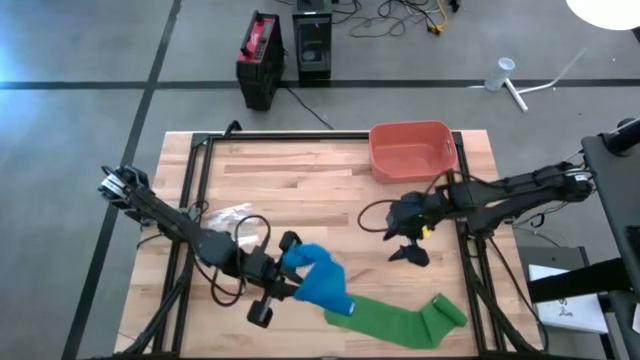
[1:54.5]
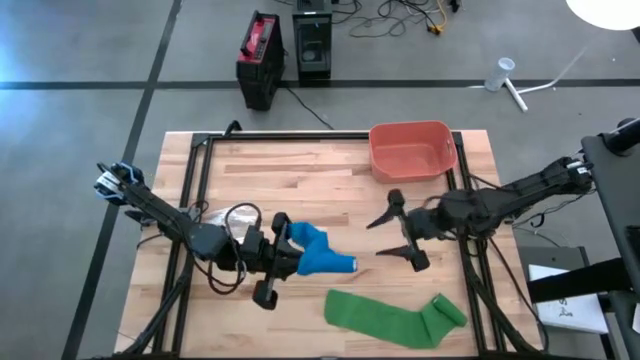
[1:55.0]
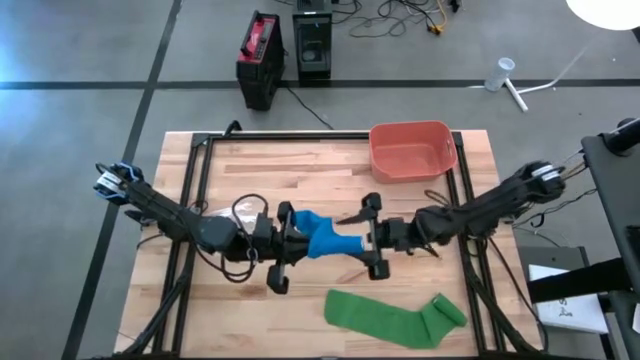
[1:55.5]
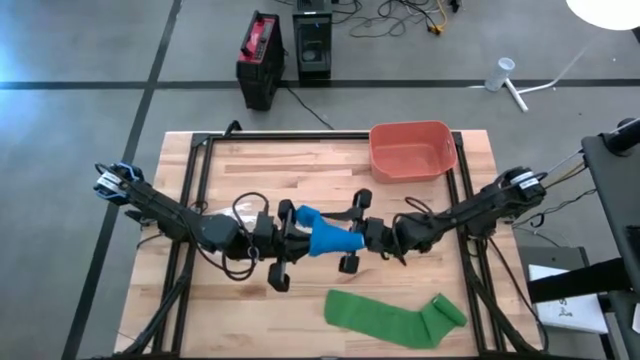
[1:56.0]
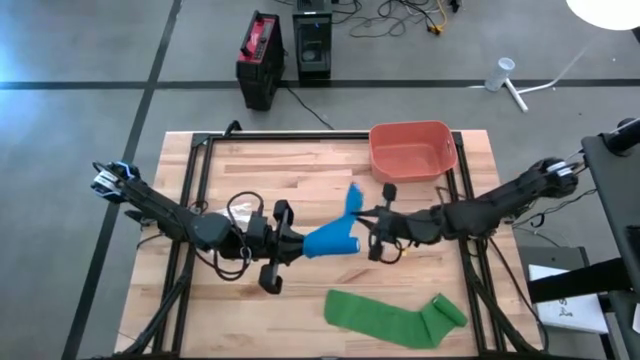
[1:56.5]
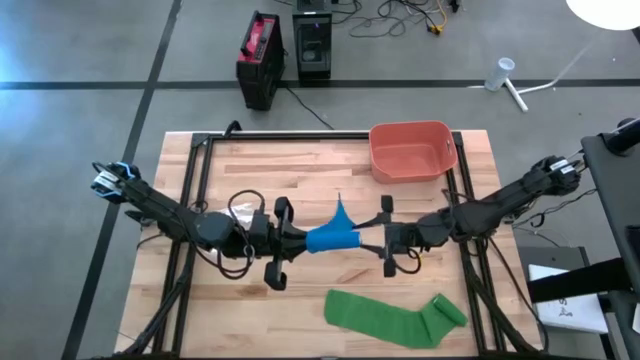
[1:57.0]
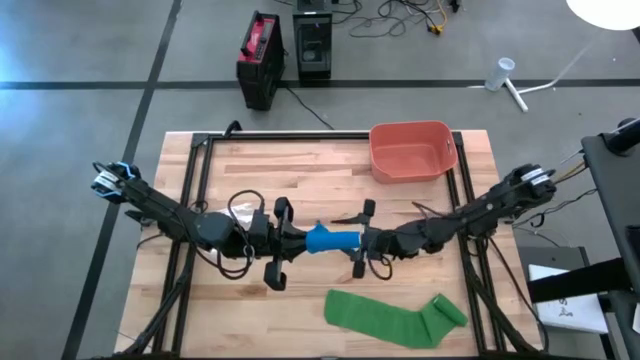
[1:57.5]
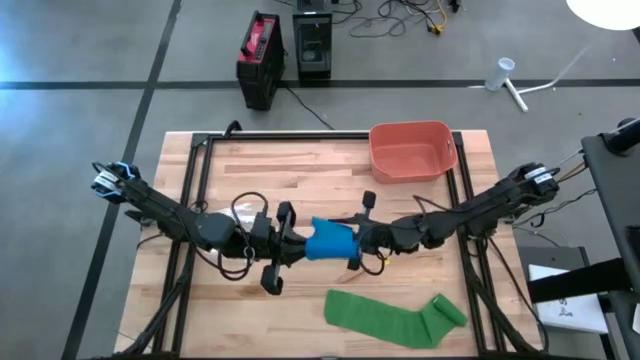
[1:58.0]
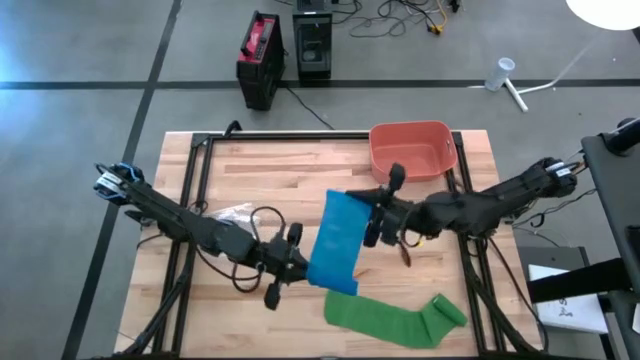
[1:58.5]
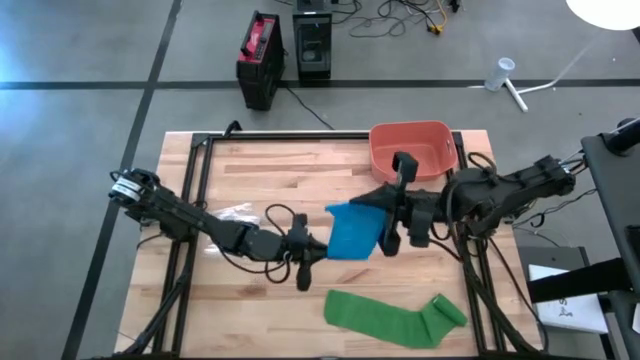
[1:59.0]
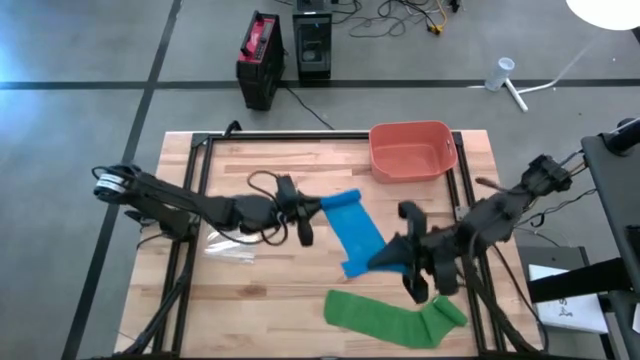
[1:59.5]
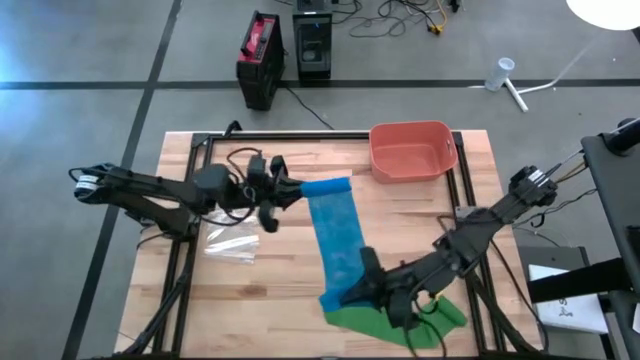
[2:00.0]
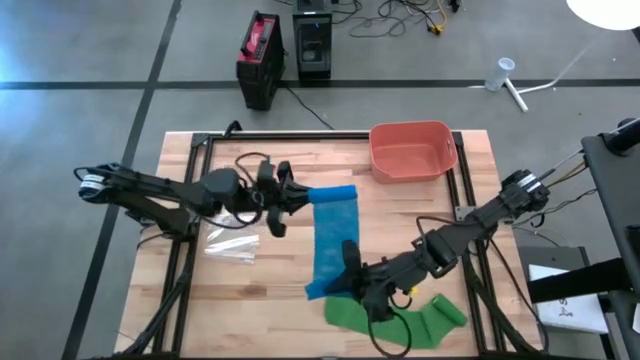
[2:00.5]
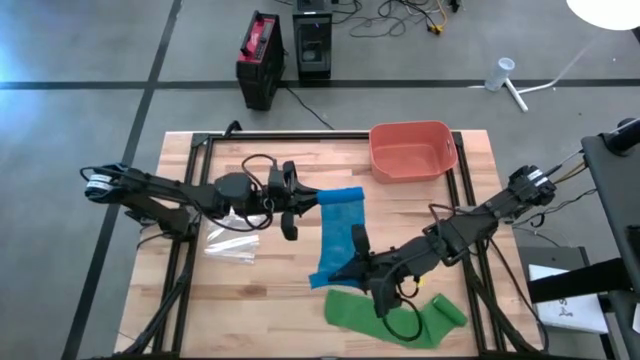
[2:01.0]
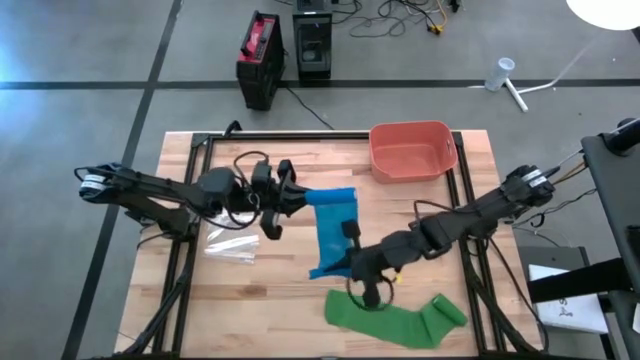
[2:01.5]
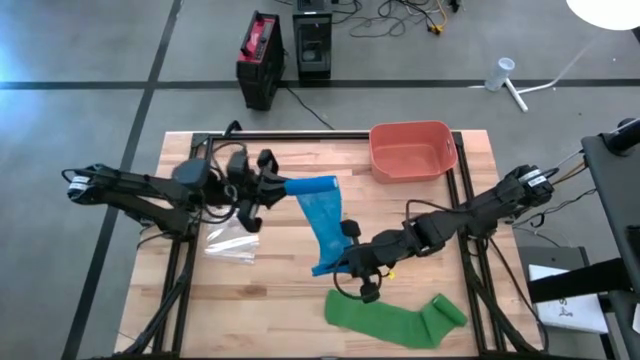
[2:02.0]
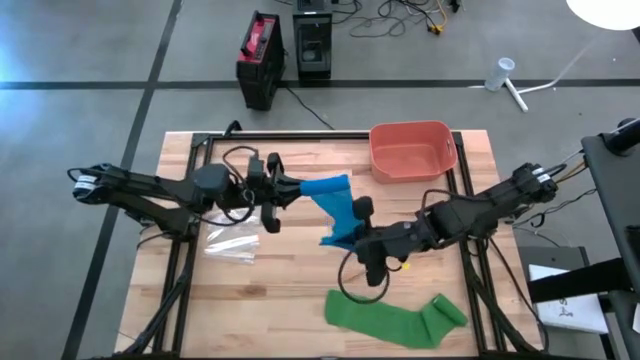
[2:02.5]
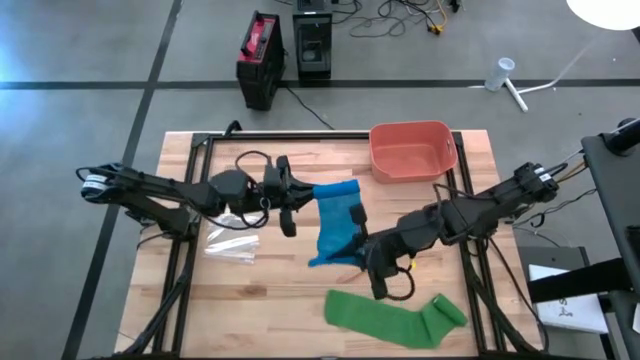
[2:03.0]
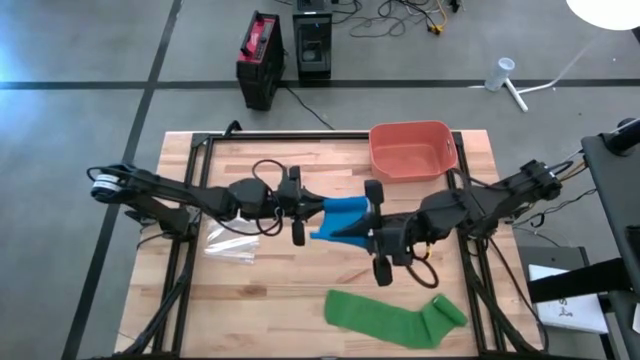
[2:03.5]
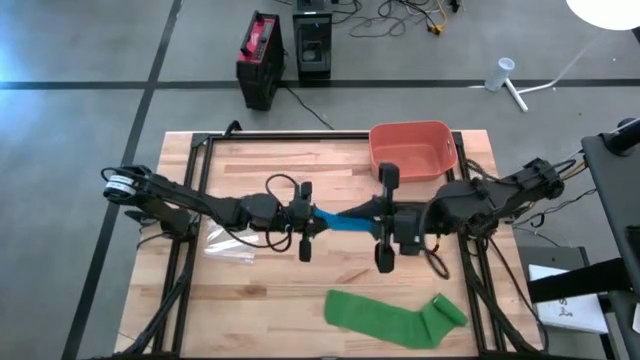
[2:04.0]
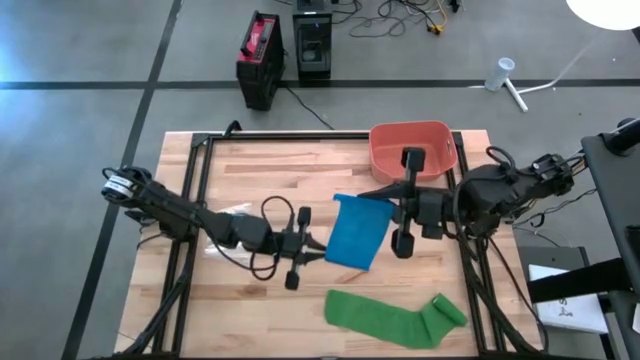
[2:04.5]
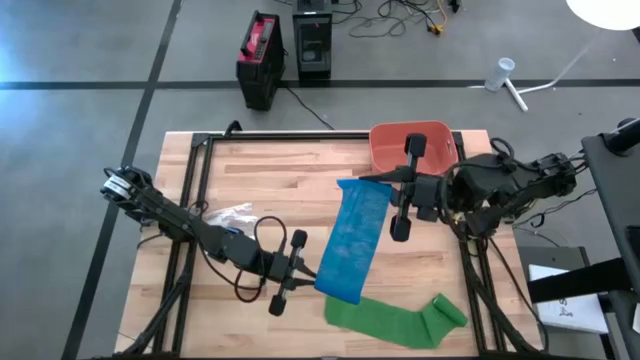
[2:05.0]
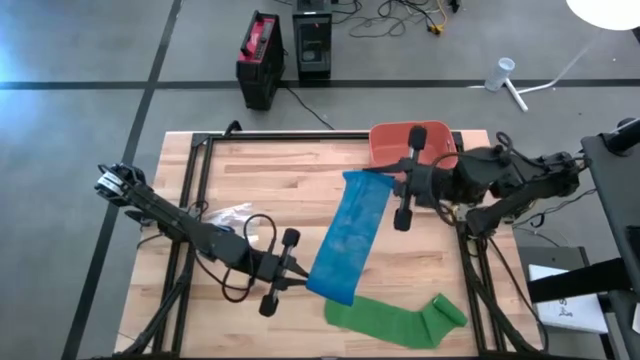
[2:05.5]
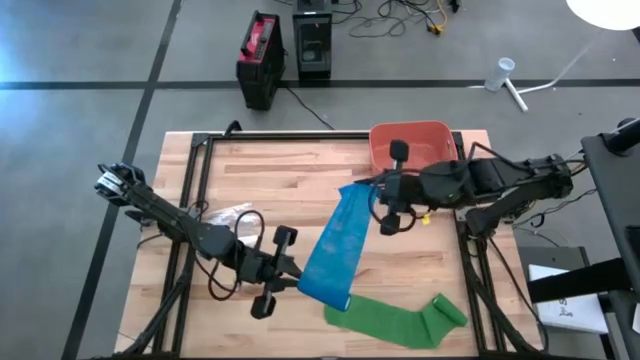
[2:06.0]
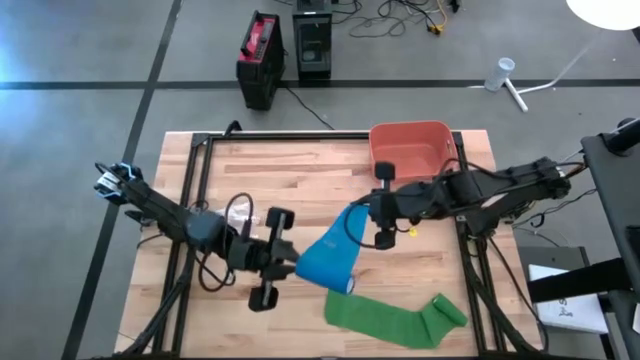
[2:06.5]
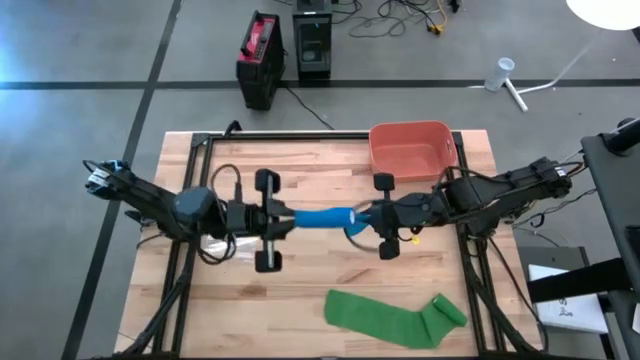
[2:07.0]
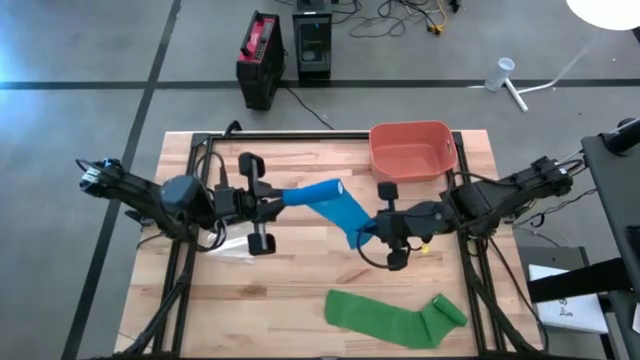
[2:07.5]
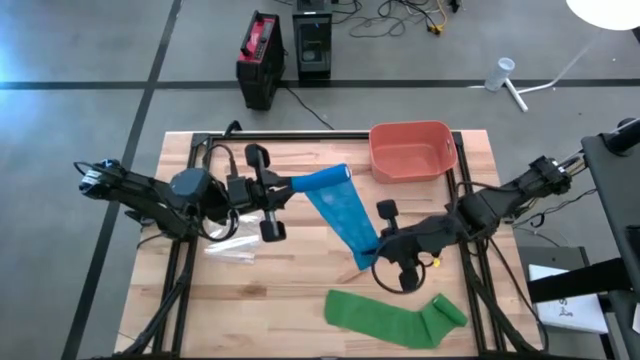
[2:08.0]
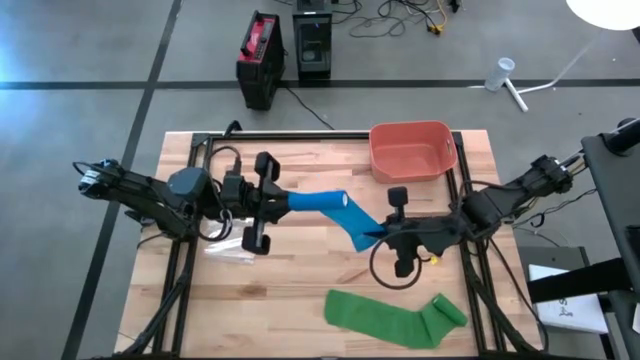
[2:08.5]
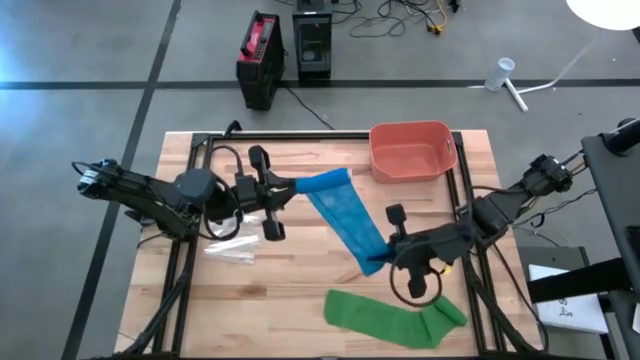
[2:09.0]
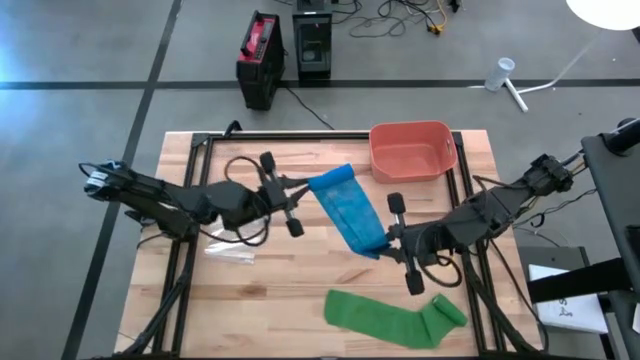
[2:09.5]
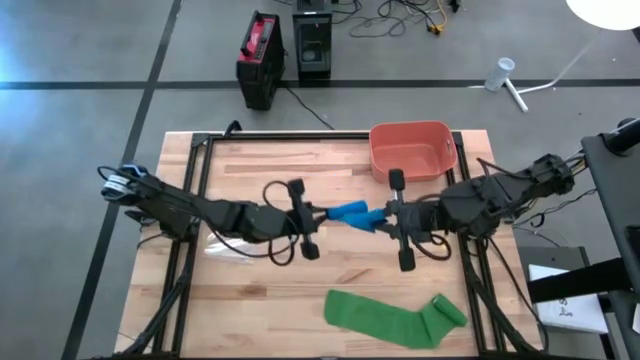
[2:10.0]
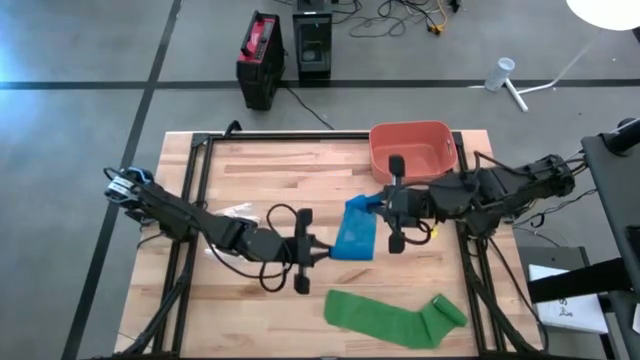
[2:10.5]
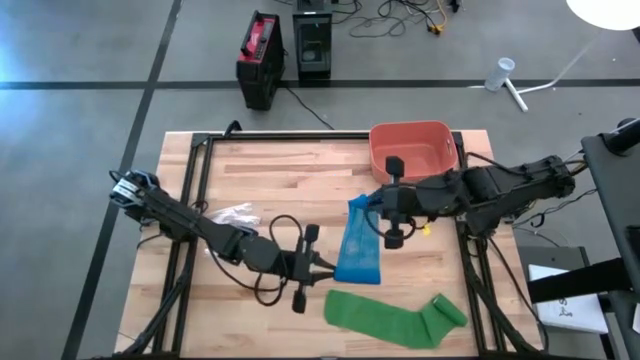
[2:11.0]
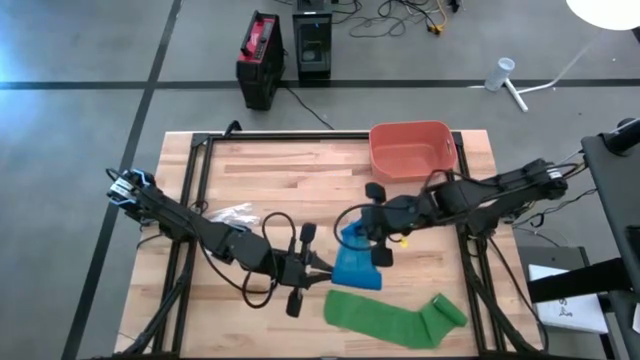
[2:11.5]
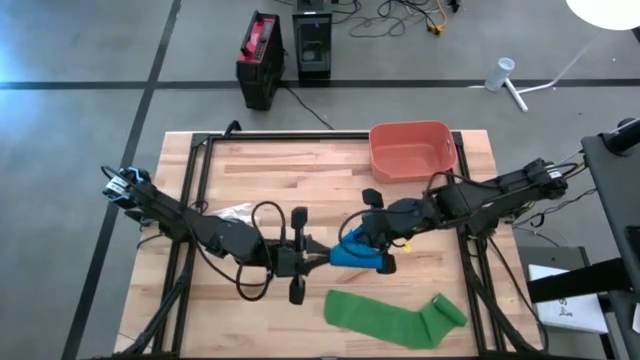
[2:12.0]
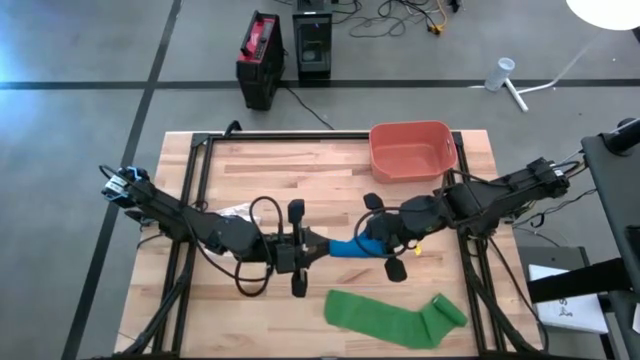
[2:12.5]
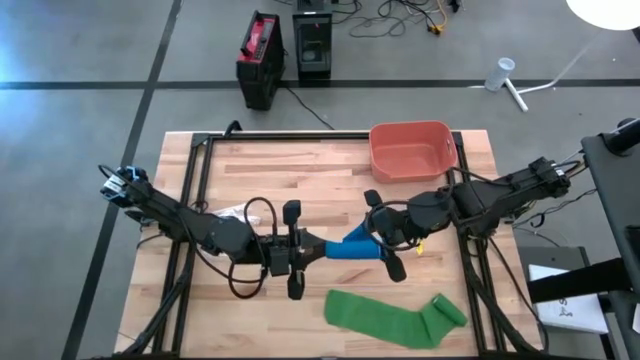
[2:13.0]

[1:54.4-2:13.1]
Task: Roll bandage
Roll the blue bandage

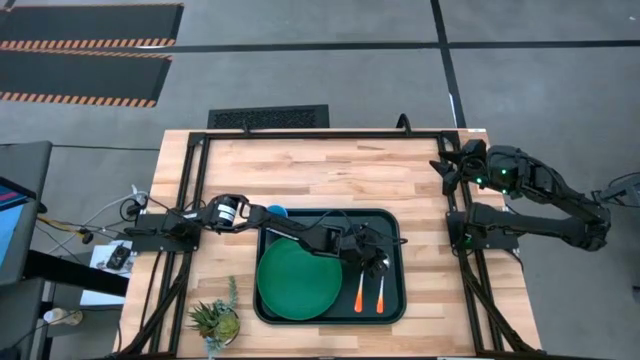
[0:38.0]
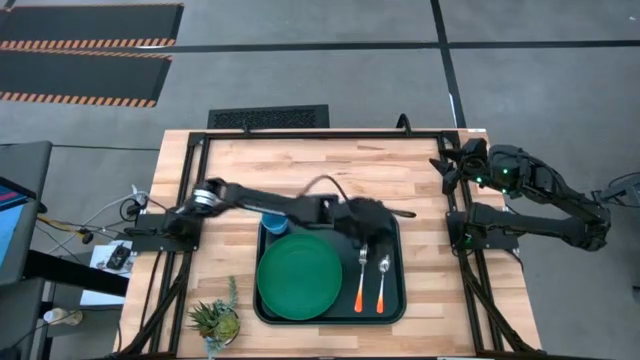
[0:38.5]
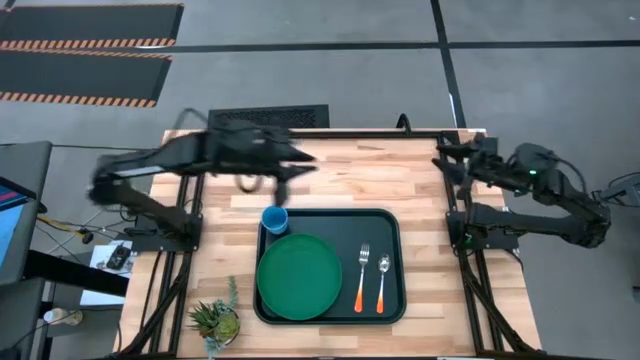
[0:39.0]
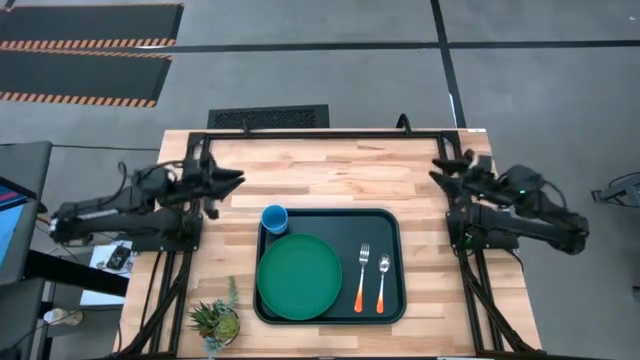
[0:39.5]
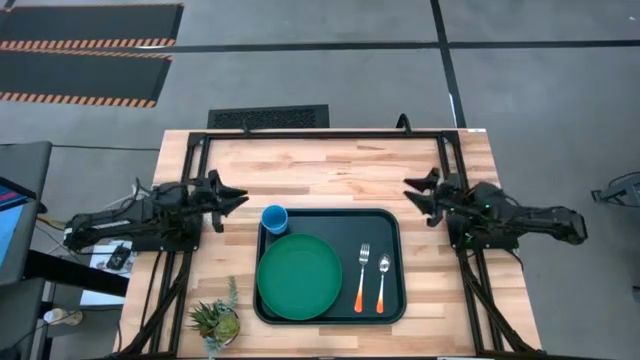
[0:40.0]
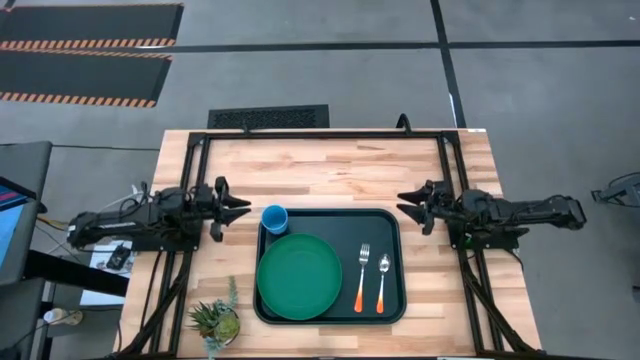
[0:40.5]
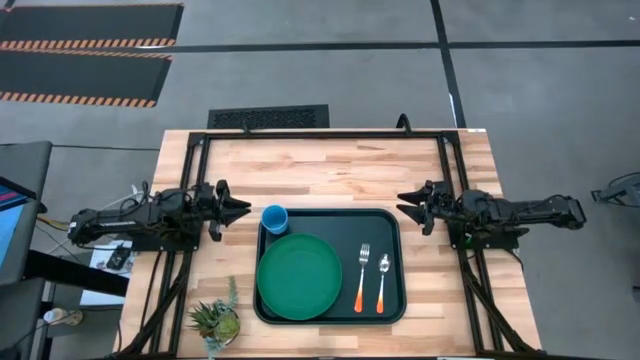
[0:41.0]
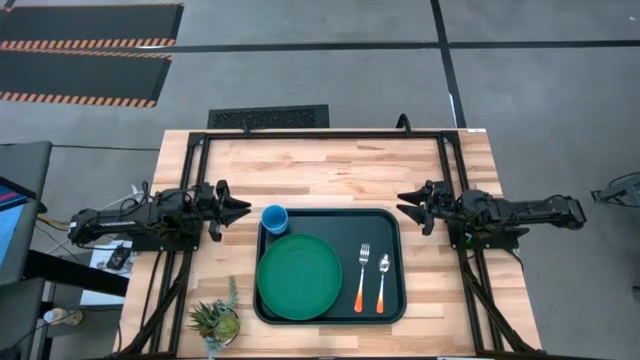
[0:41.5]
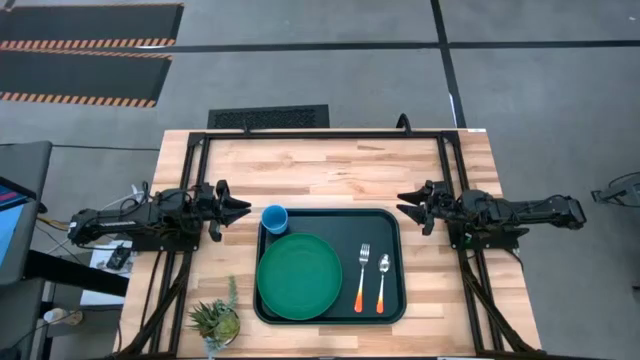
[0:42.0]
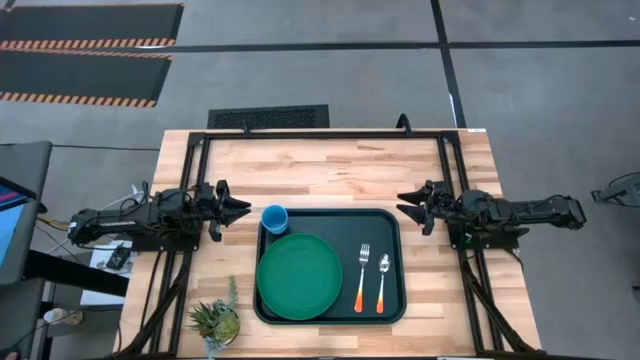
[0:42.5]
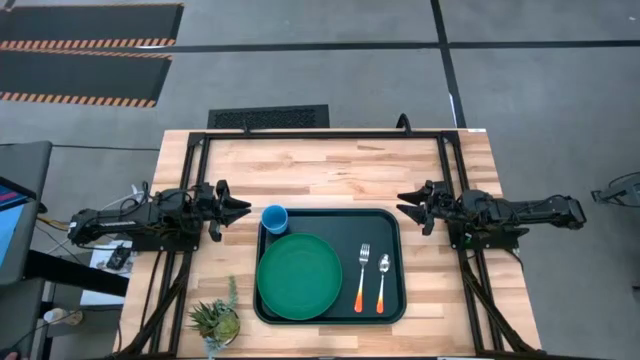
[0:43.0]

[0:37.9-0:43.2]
Task: Pick and place plate/cup/fork/spoon on tray
Return to Home Position
